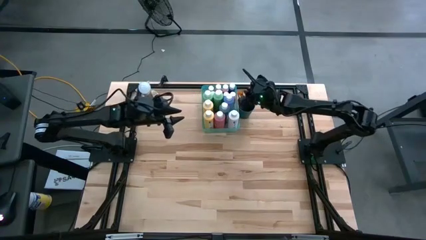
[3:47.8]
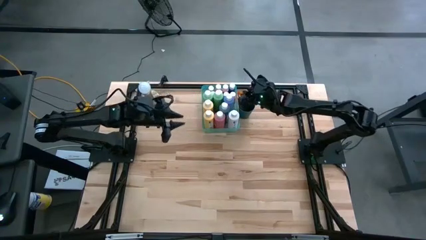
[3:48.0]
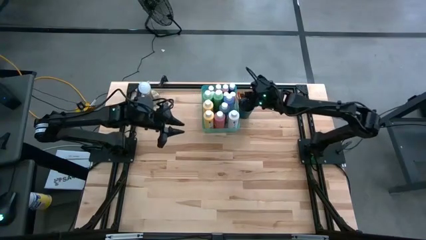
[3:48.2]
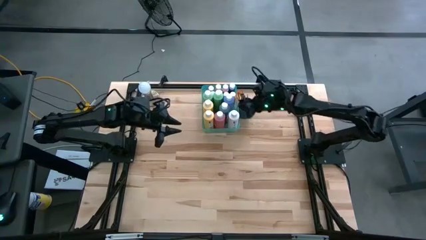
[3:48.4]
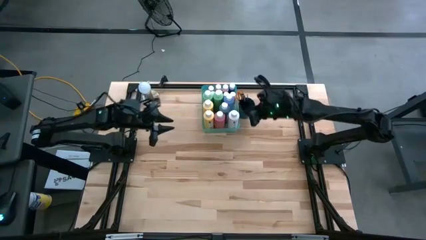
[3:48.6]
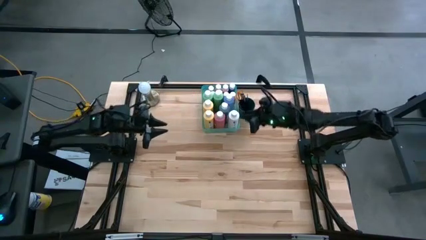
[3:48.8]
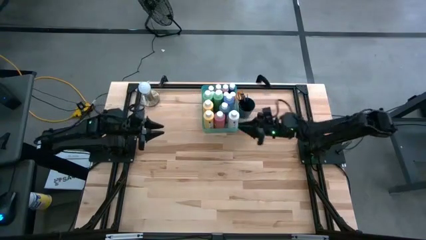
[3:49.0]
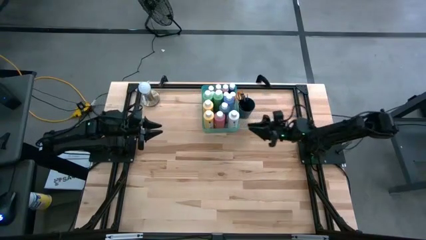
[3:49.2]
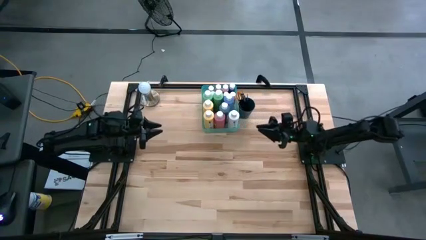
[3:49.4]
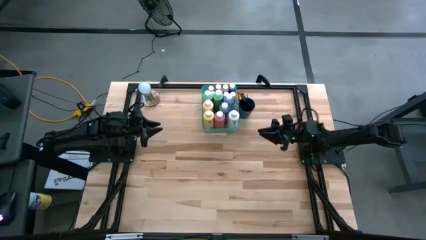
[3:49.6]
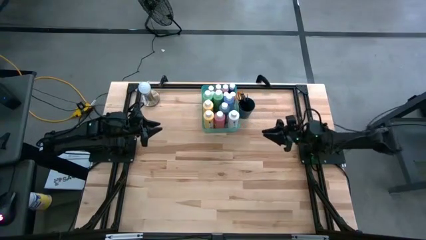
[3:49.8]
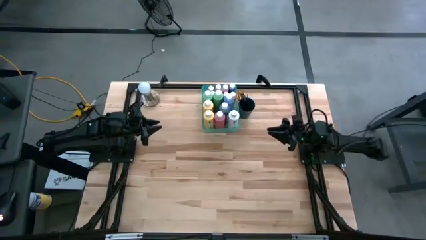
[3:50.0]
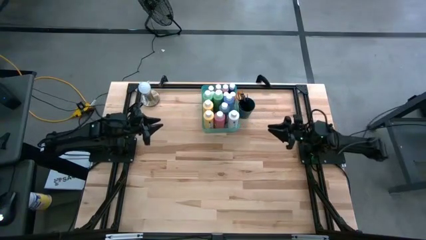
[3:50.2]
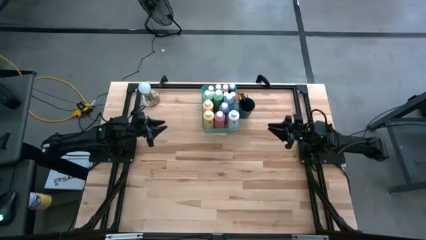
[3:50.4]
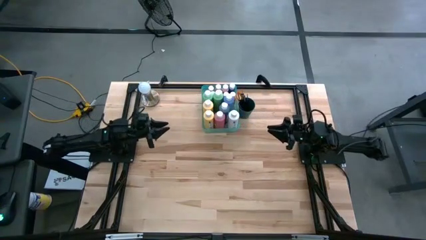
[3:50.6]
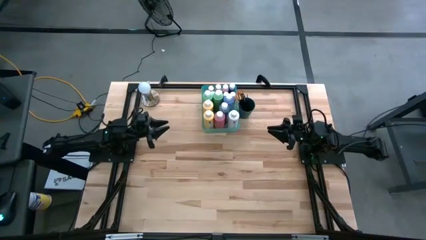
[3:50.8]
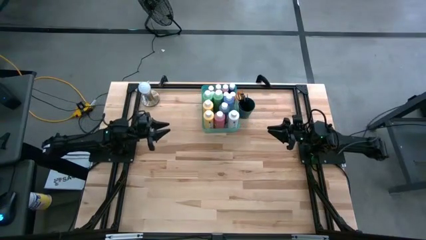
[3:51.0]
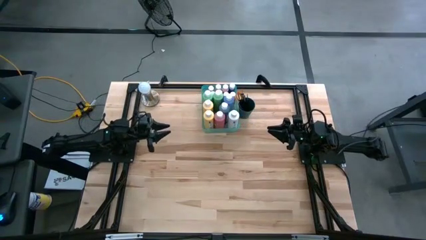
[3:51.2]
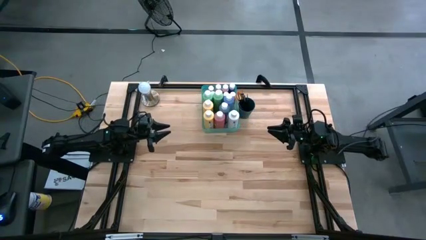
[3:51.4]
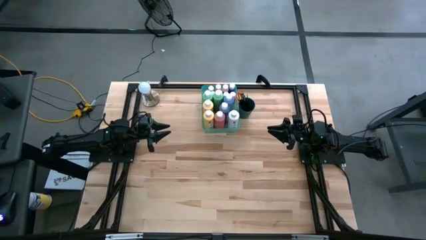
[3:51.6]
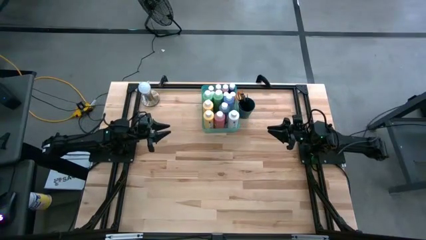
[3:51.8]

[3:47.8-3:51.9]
Task: Pick & Place Paint Supplies
Return to Home Position

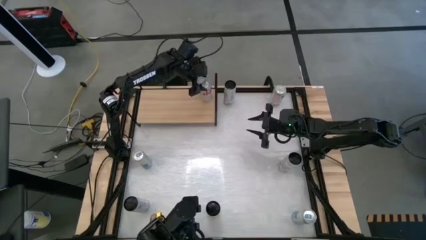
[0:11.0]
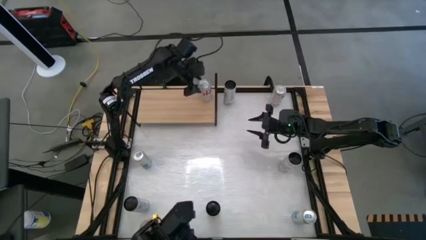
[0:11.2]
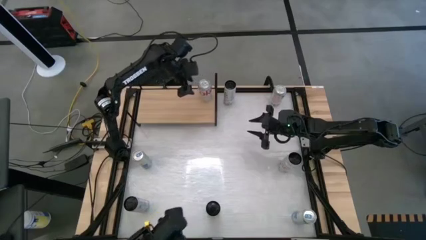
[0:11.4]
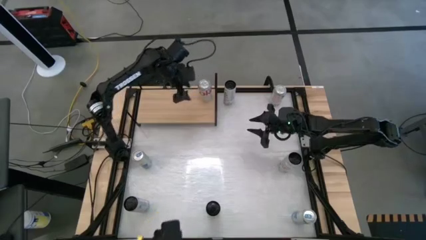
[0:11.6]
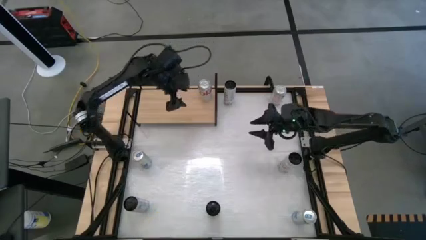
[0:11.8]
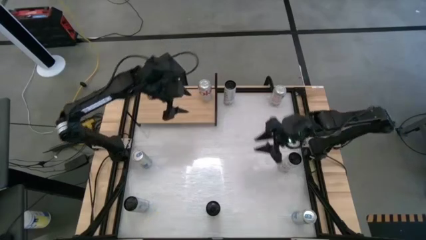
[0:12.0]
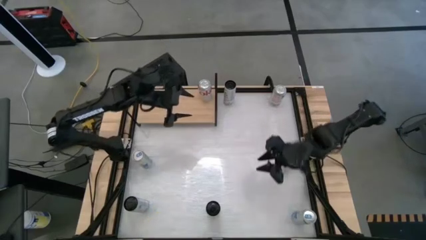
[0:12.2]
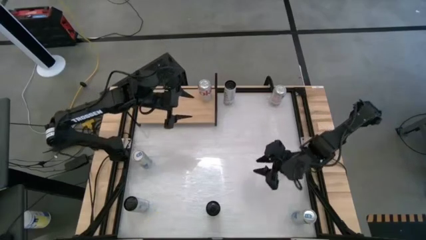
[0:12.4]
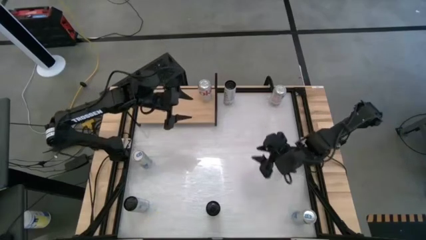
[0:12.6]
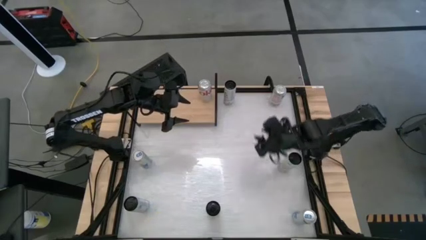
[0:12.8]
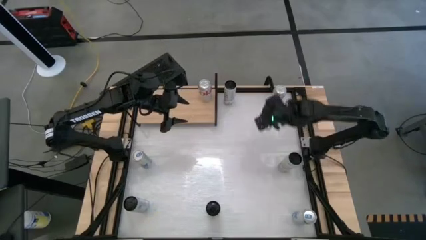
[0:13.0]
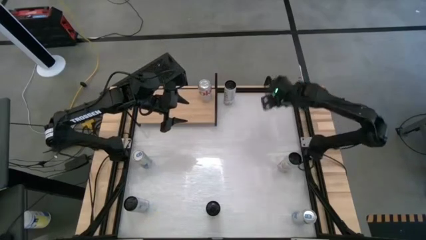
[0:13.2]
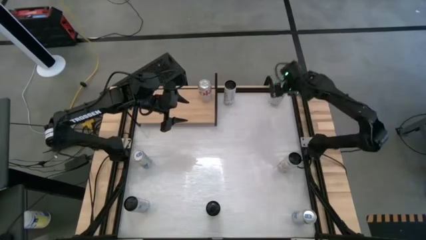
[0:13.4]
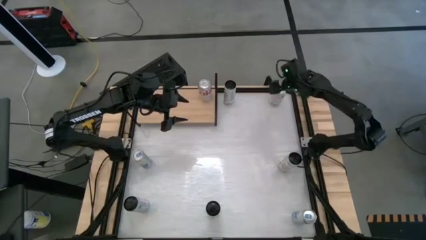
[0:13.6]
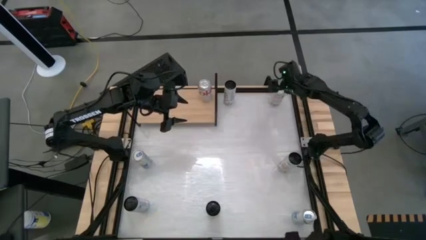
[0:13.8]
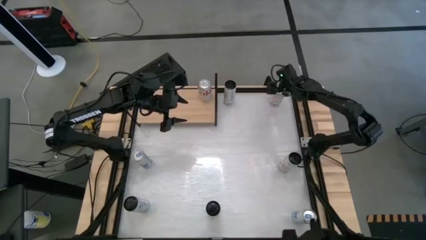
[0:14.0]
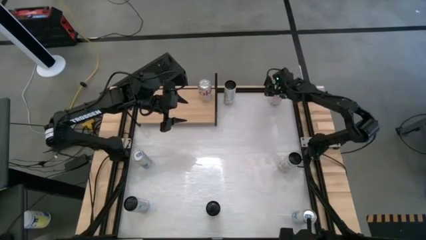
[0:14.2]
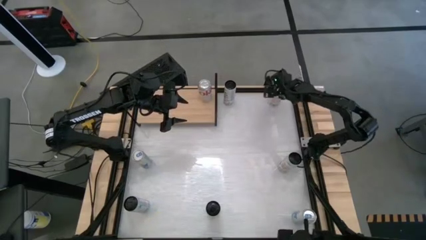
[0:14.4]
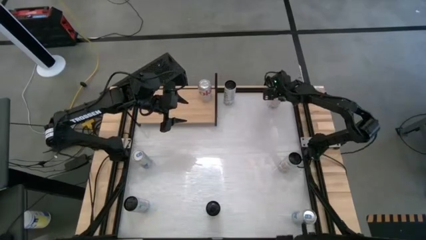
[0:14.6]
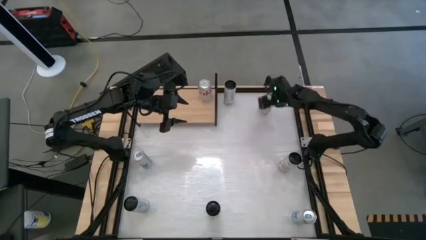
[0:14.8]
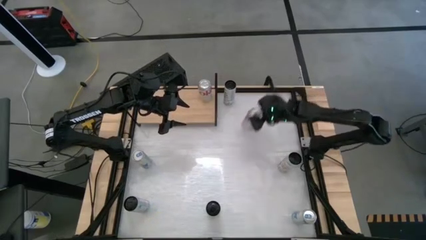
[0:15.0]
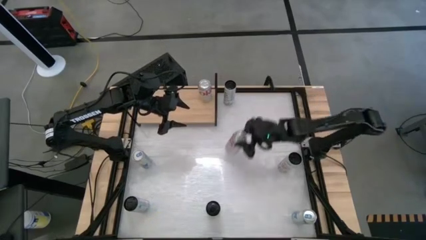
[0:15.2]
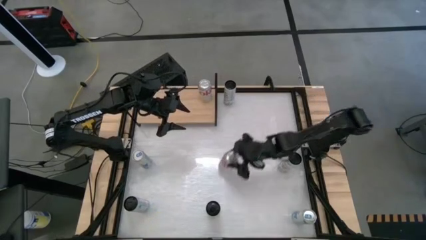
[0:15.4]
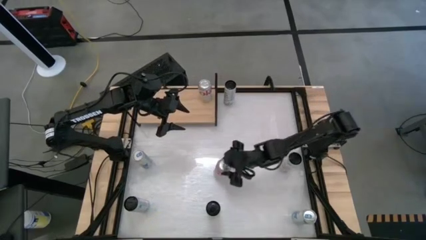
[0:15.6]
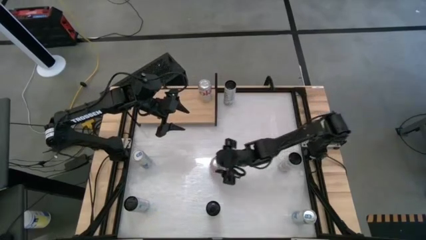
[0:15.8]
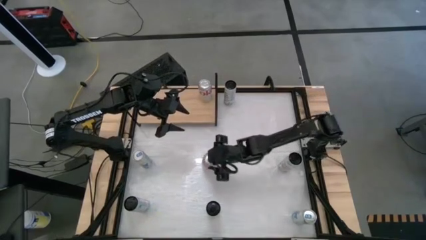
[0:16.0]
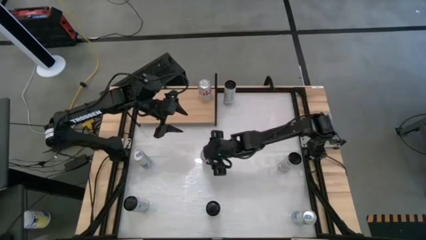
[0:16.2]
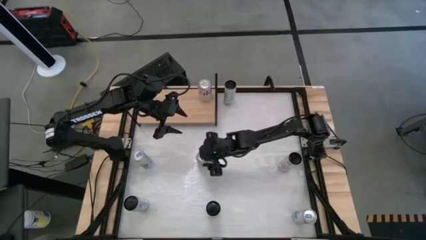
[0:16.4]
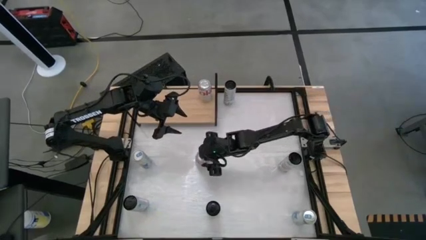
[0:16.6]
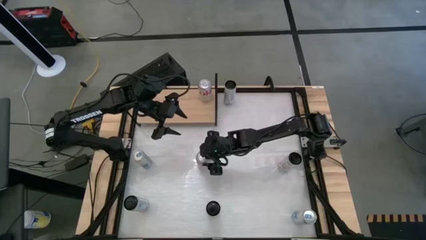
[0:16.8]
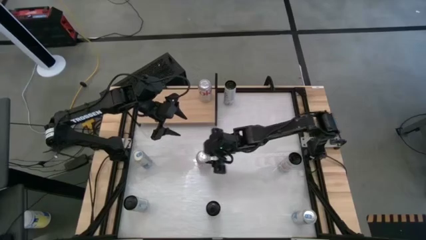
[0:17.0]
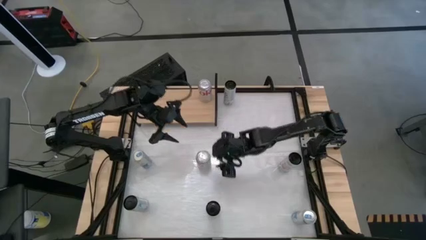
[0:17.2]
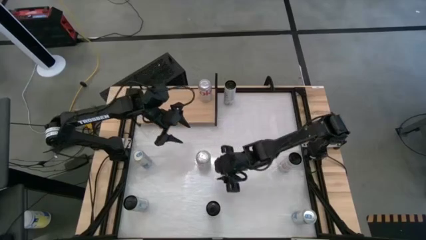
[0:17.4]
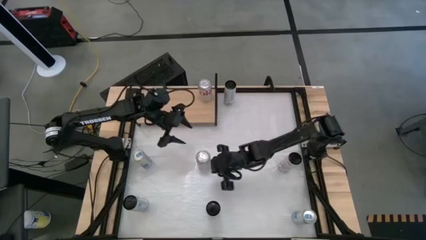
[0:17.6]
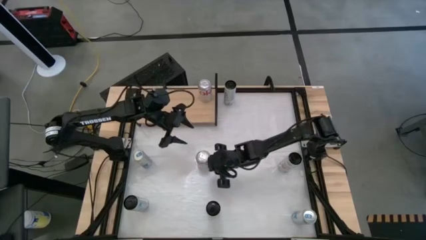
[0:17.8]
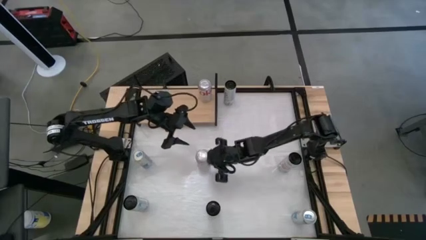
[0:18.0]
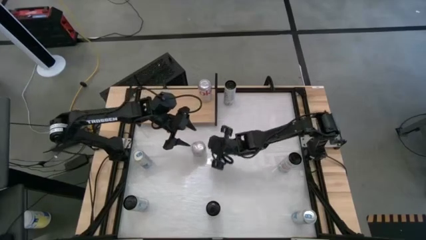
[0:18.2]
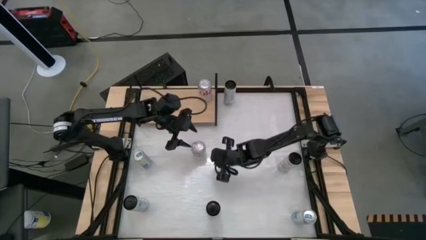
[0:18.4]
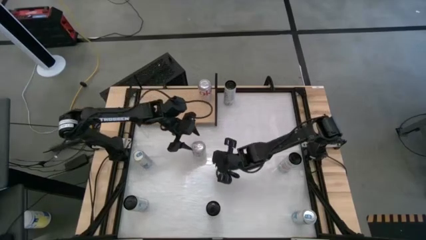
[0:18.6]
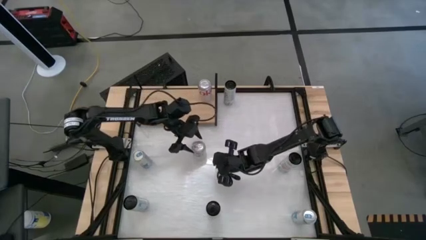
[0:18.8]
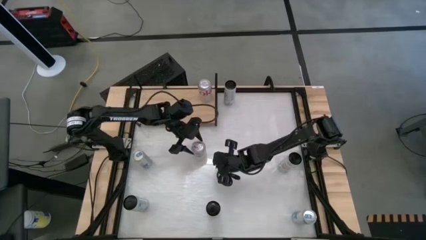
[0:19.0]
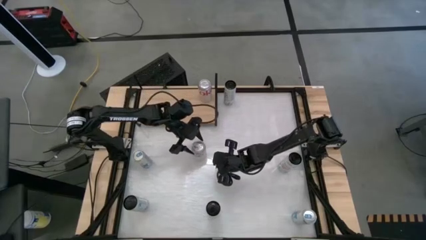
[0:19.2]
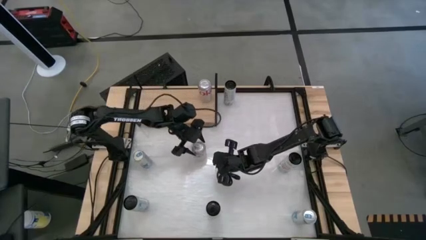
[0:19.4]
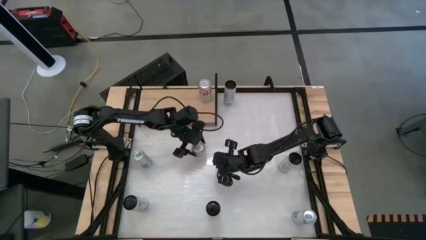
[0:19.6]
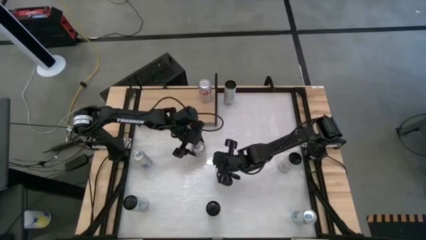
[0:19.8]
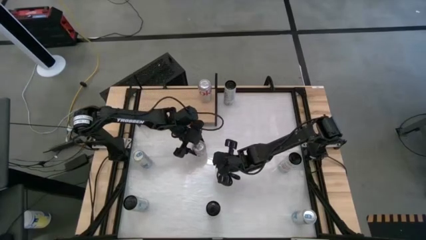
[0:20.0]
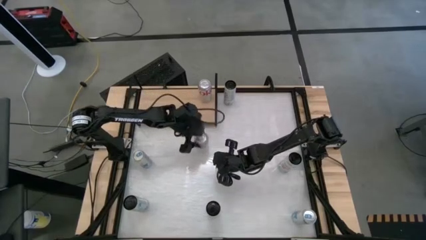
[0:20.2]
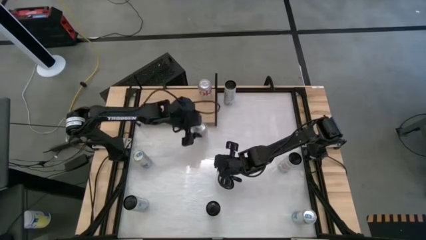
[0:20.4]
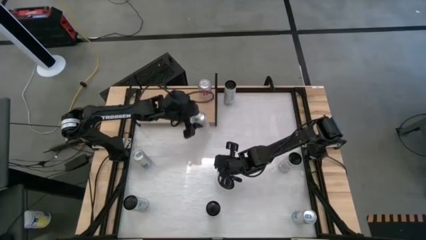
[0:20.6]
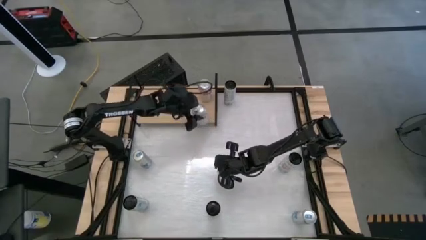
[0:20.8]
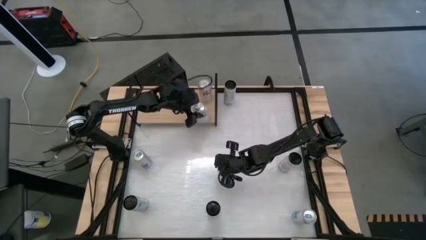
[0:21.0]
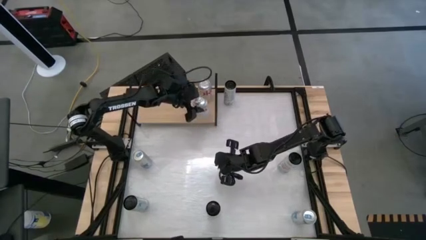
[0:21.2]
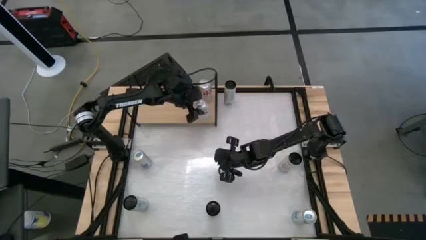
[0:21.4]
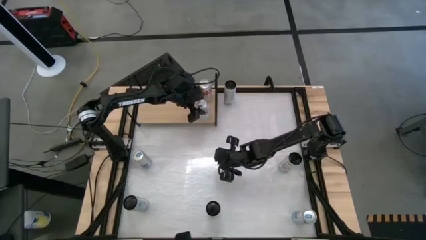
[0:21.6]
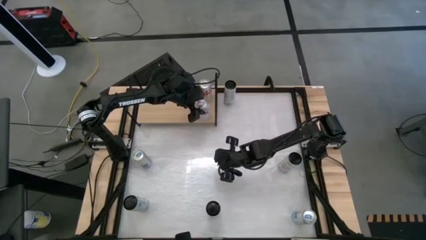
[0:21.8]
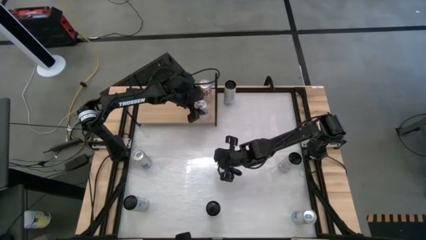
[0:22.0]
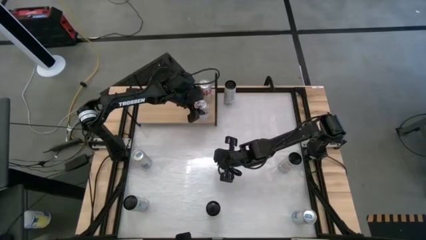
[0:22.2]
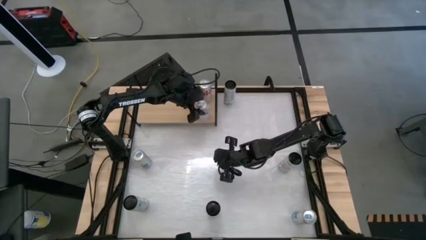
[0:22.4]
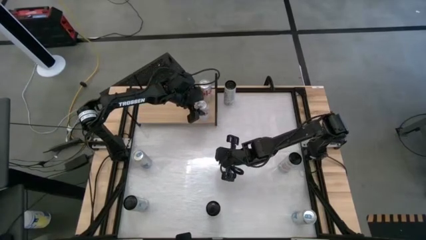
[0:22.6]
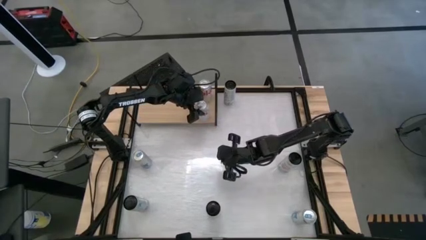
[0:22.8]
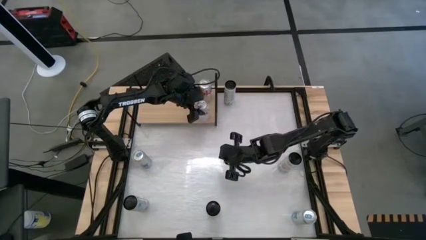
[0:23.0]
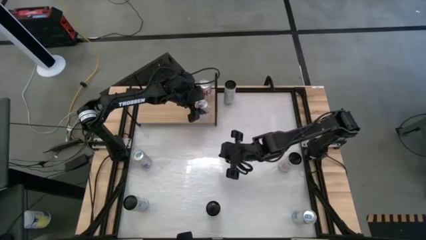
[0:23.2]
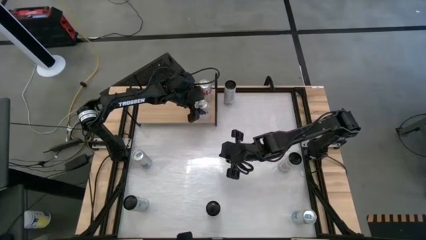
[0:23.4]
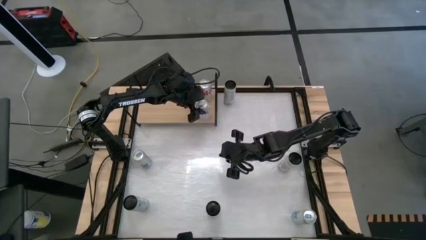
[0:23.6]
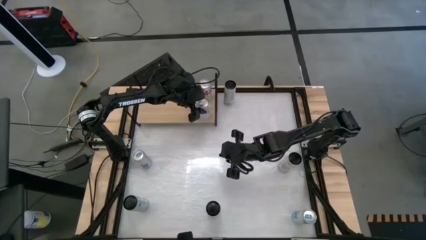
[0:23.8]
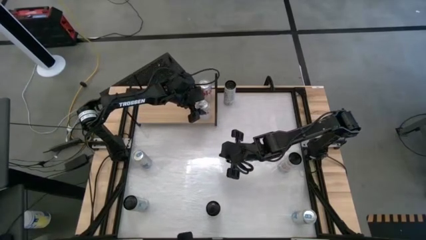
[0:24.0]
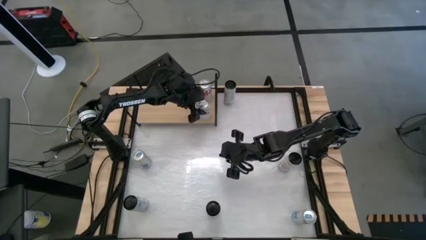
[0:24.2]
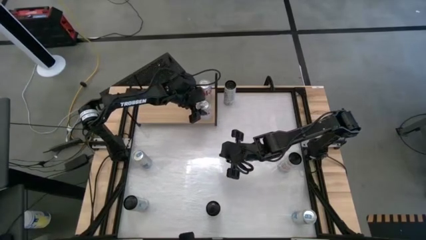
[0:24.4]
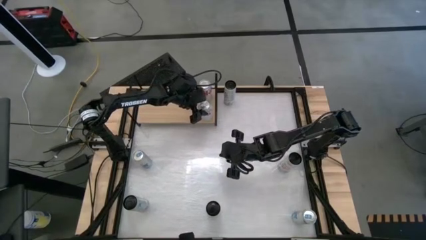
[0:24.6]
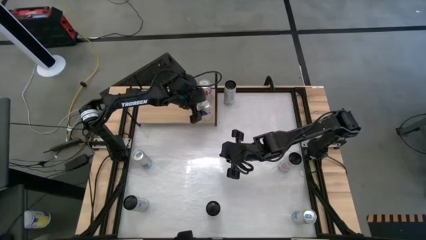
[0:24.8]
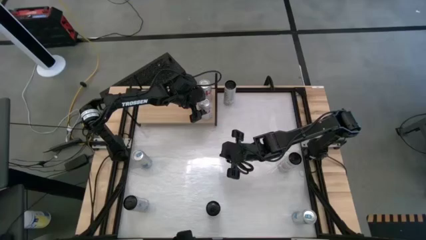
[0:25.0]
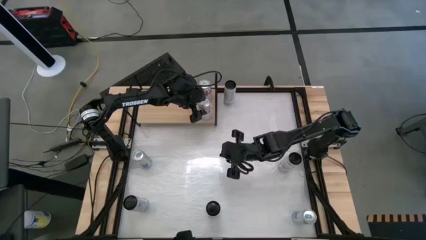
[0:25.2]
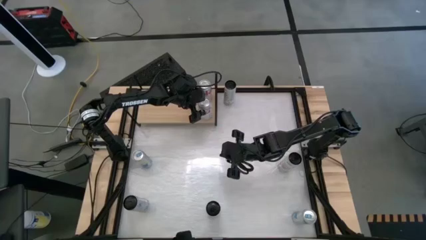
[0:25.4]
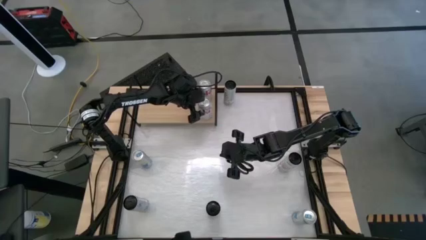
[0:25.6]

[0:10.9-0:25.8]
Task: Place canned beverage on shelf
Put the silver soda can on the shelf aligned with the other silver soda can
